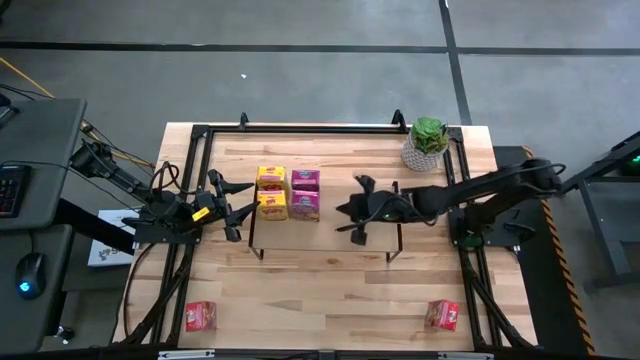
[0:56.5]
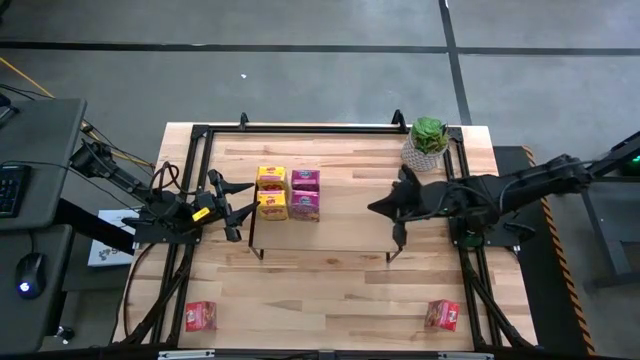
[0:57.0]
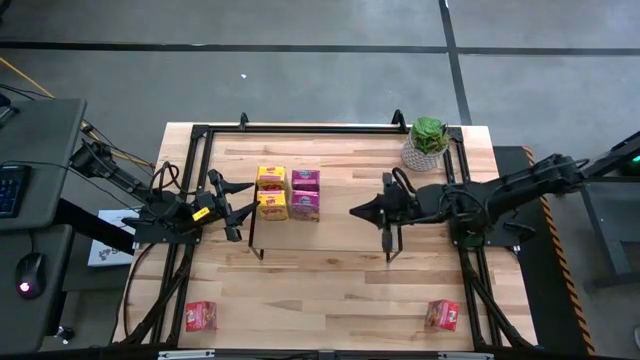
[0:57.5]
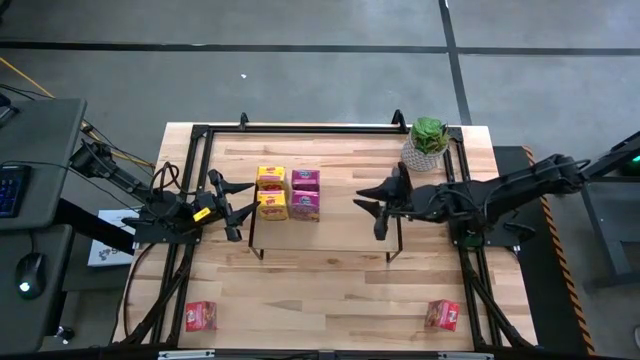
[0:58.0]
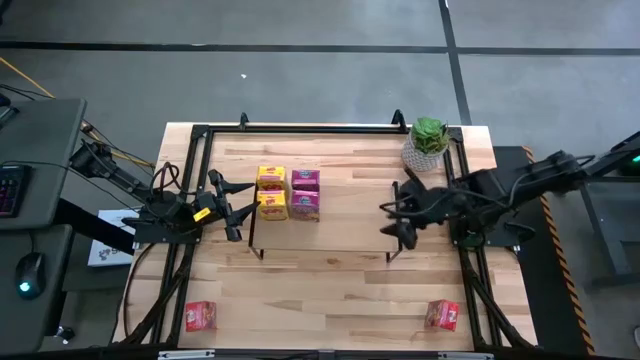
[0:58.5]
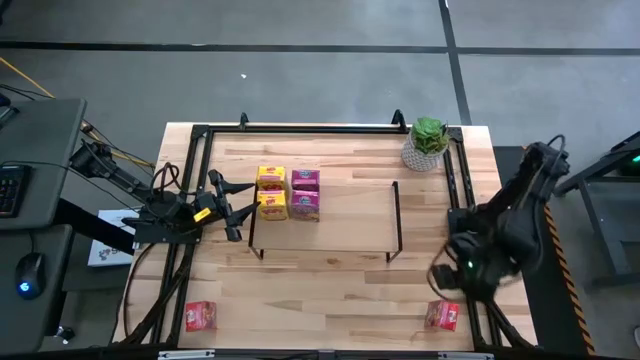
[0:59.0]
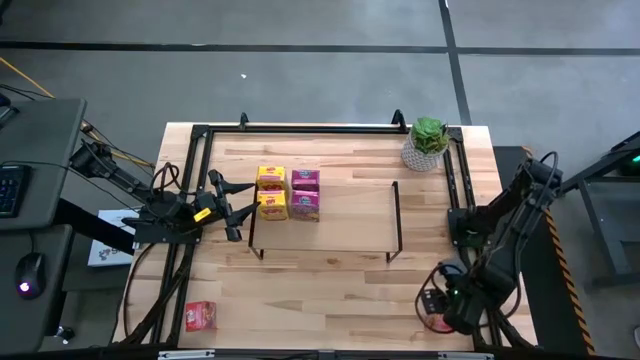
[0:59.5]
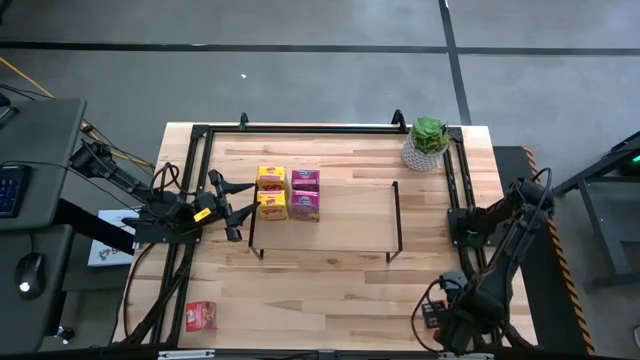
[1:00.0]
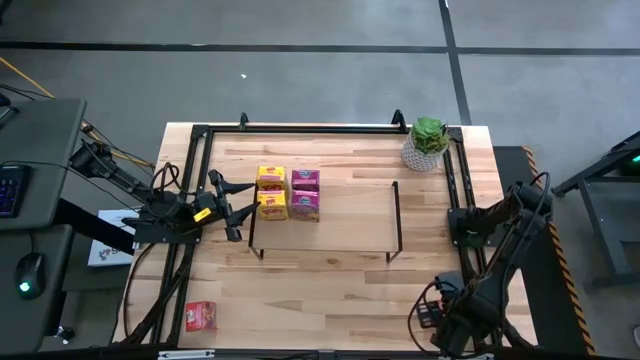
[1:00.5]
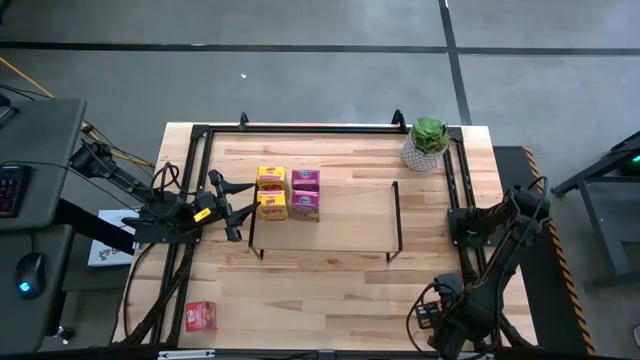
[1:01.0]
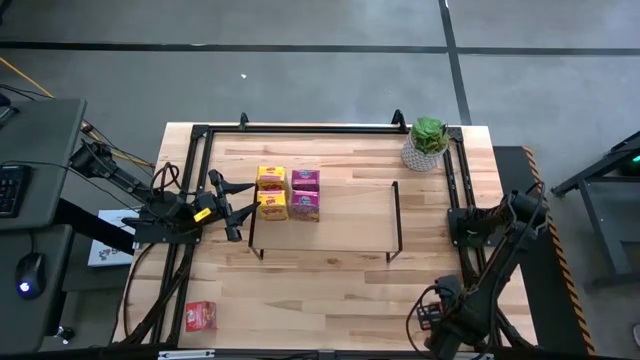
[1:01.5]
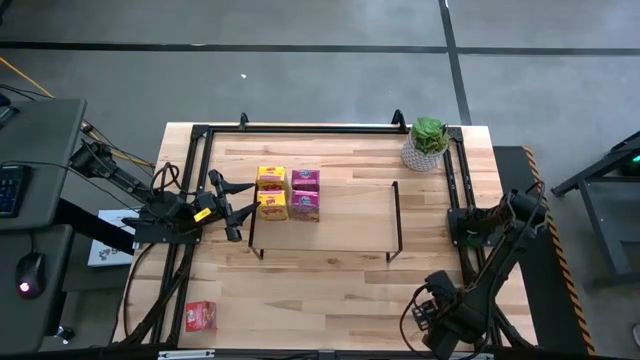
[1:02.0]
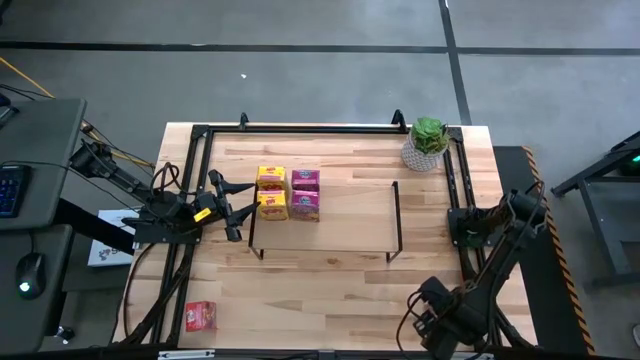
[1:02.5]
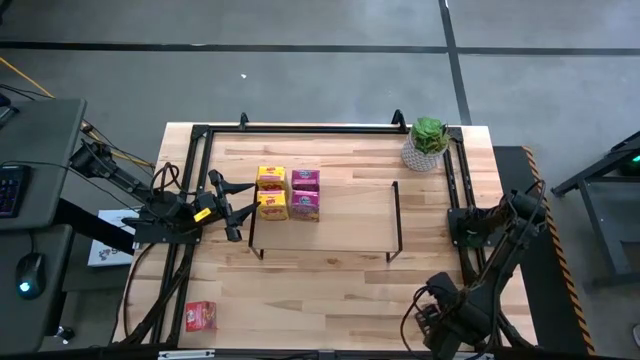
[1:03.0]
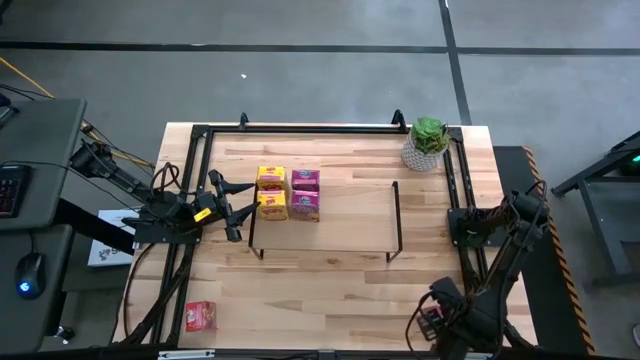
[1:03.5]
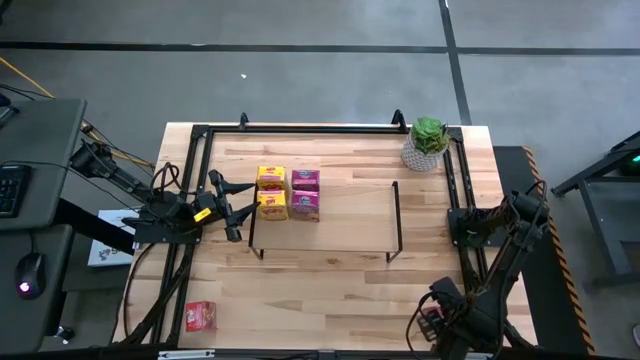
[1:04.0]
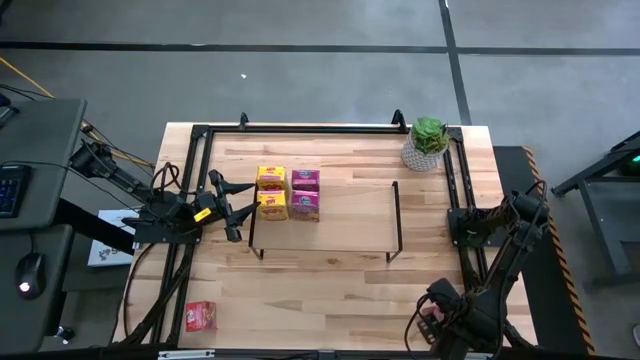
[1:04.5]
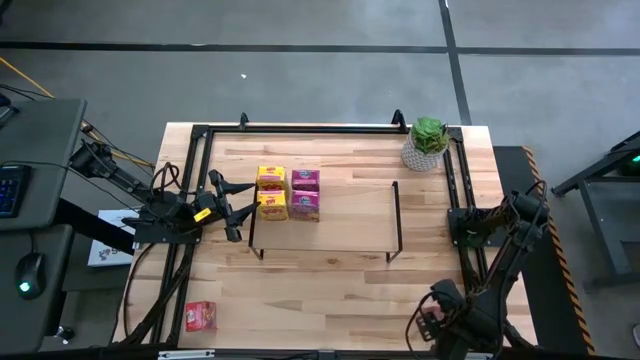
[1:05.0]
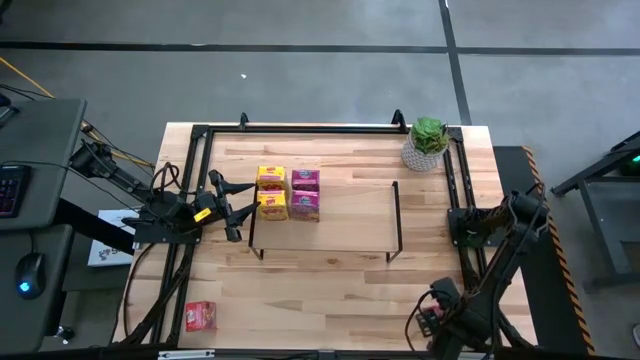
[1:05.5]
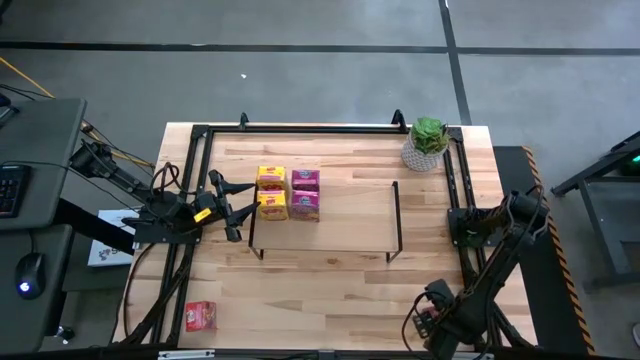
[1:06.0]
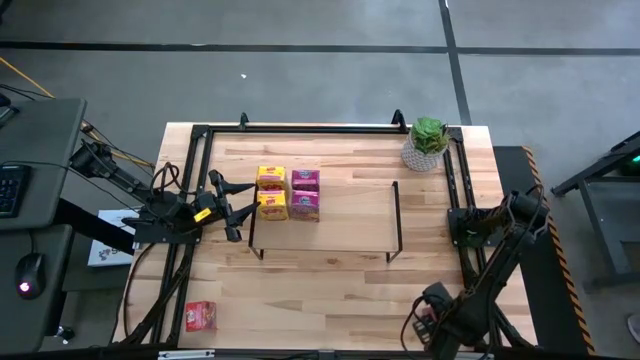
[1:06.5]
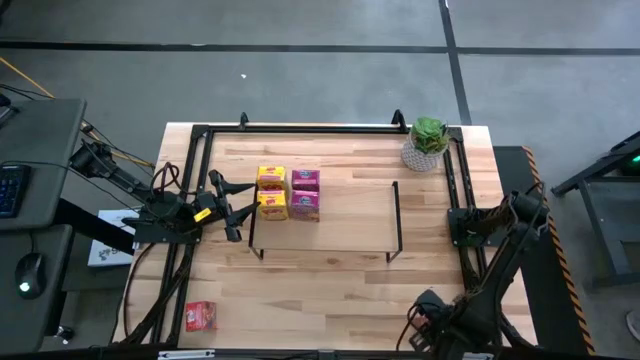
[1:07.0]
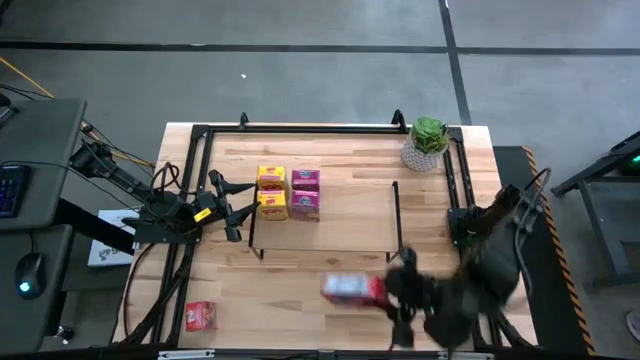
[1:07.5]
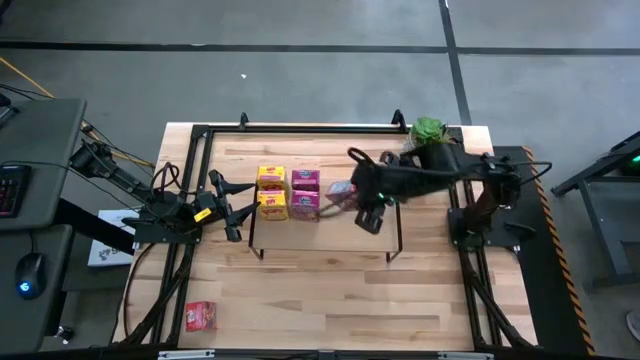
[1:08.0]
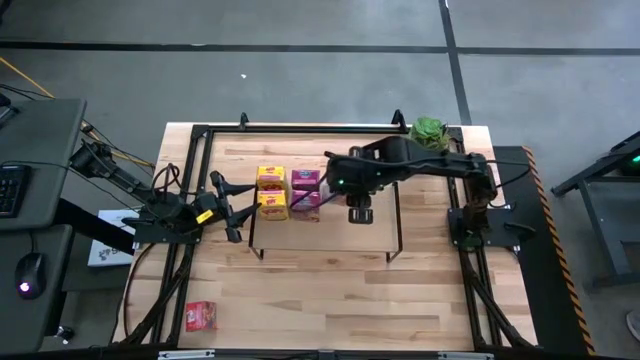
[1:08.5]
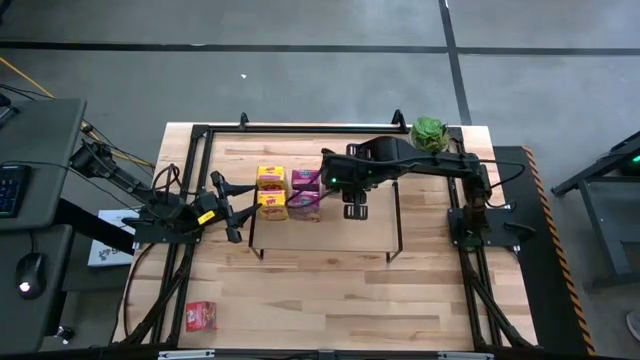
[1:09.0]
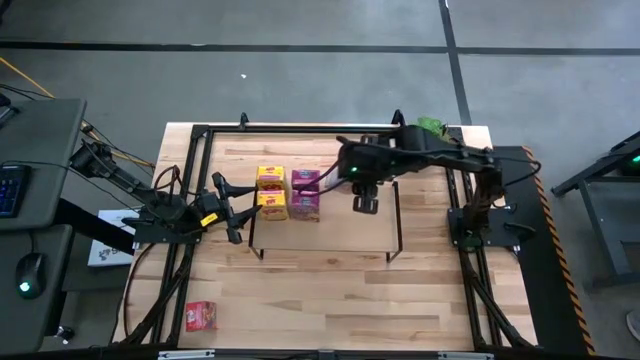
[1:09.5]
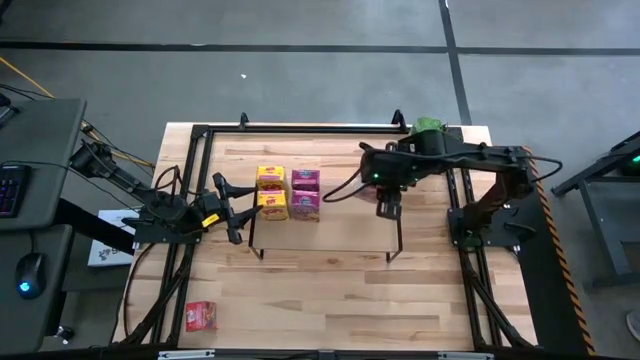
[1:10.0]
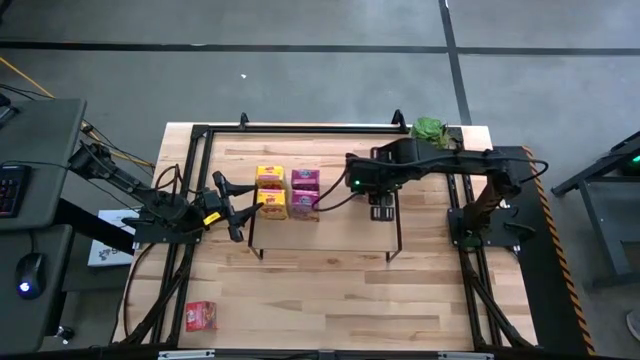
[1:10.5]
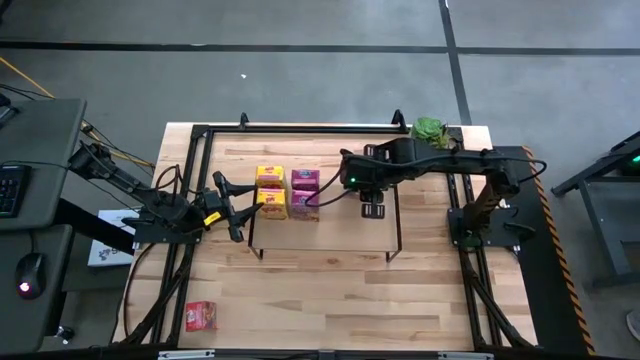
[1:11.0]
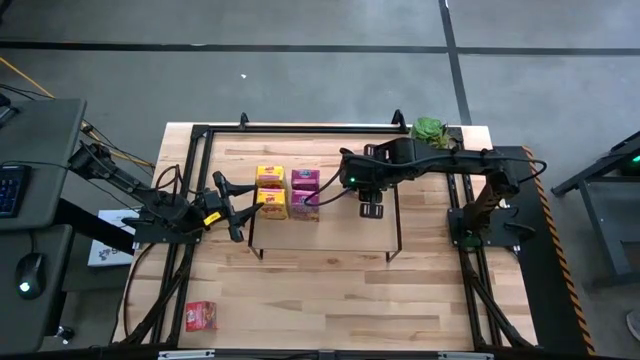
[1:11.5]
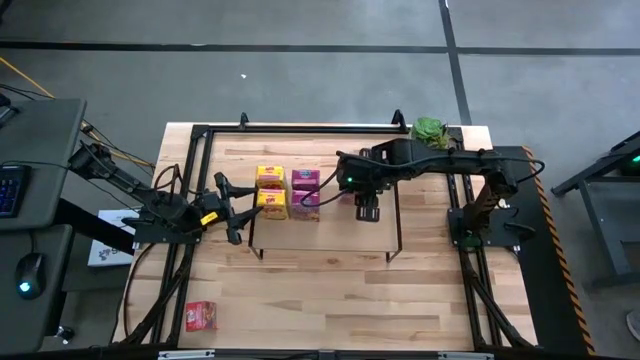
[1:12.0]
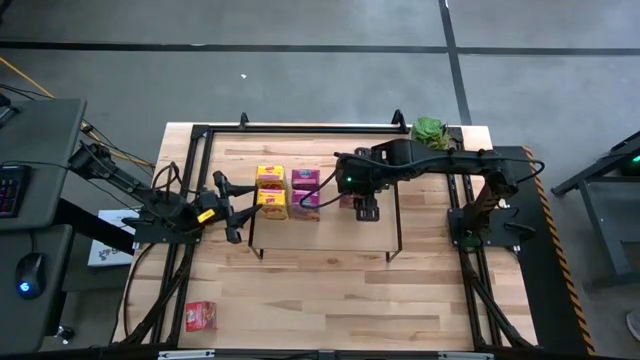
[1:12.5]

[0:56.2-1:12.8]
Task: Stack cereal on shelf
Put the right red cereal box on the shelf

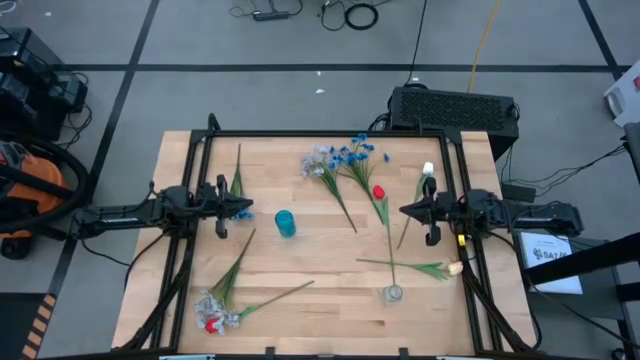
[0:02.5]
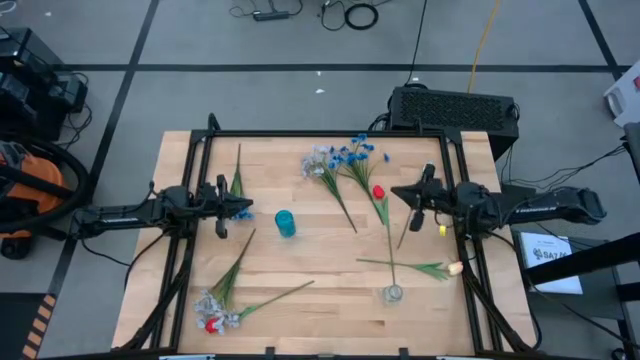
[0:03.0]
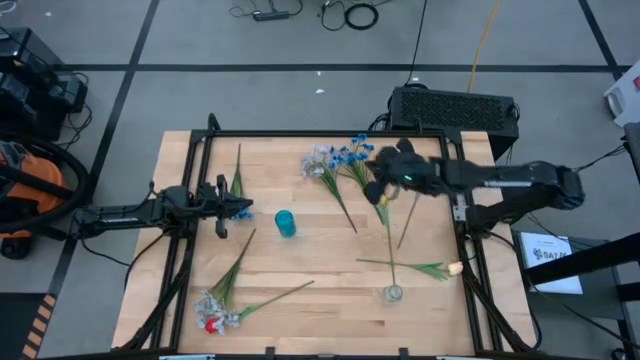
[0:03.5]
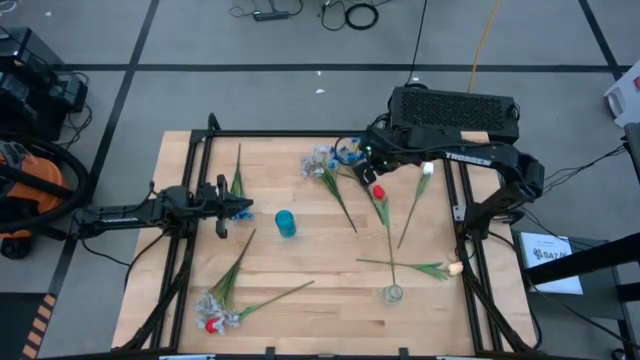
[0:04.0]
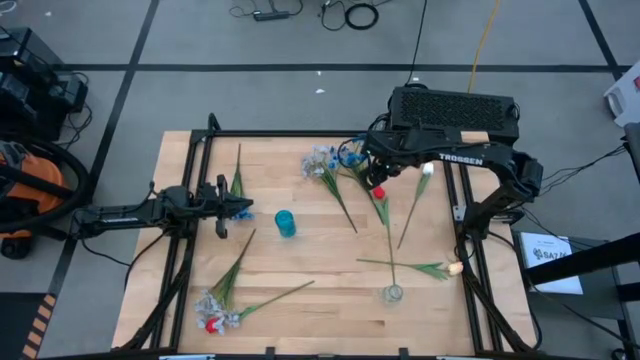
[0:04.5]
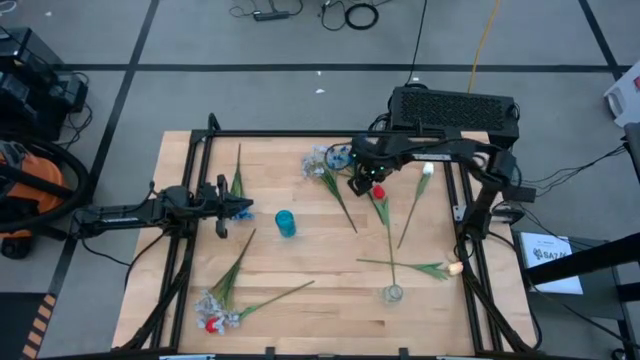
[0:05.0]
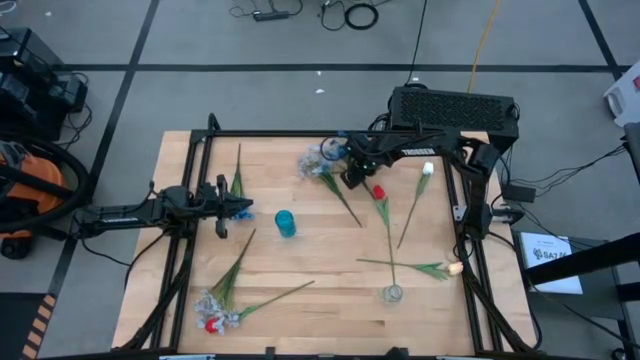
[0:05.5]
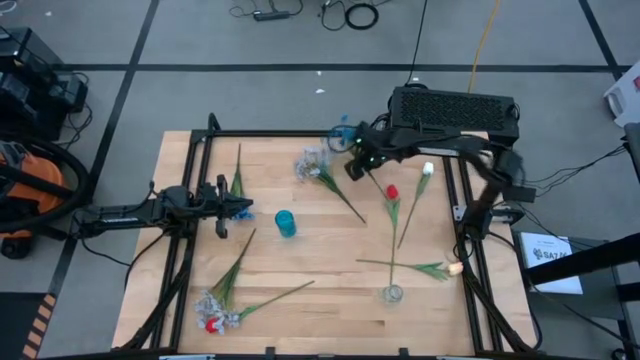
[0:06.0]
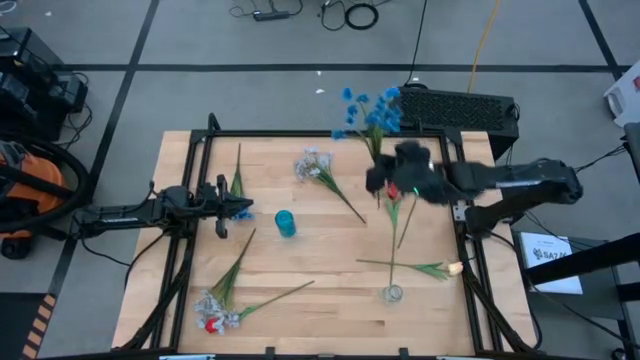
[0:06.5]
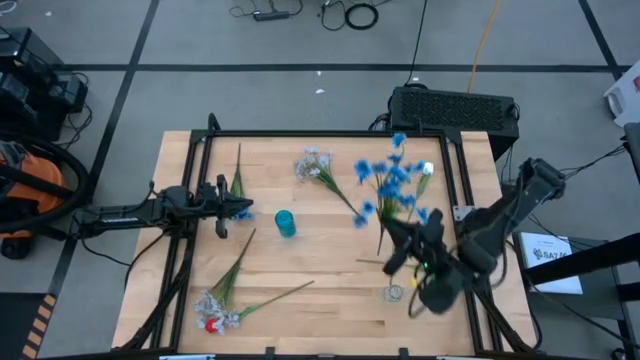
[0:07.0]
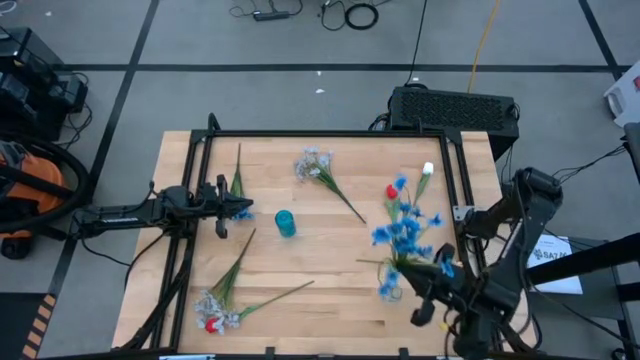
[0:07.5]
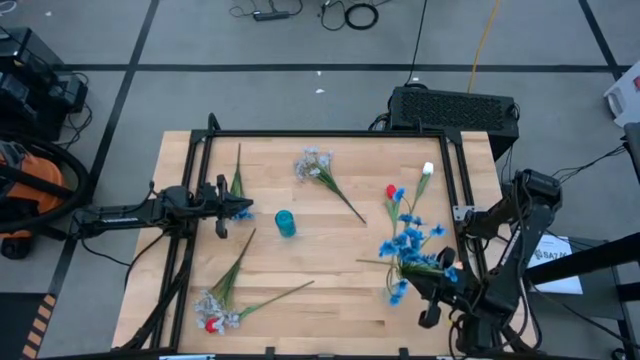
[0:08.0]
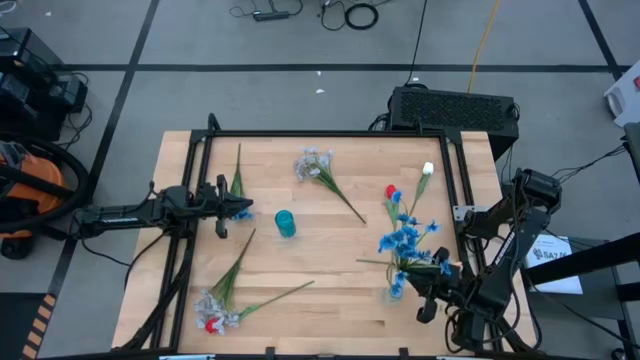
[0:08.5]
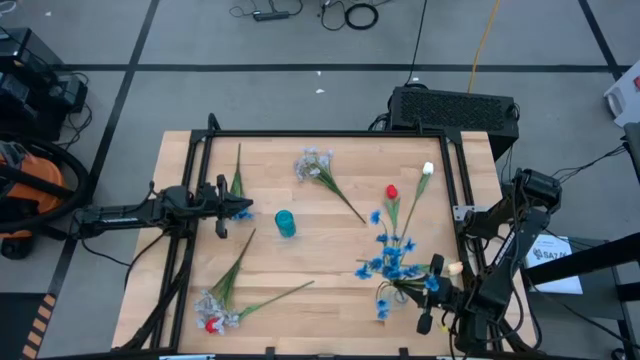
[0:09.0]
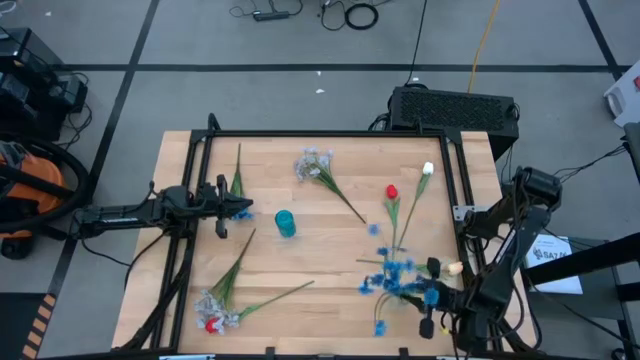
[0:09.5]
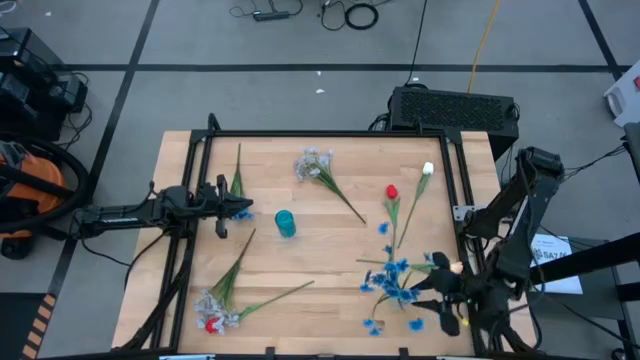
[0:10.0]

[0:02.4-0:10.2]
Task: Sort flowers into vase by color
Put the right blue flower into the transparent vase
